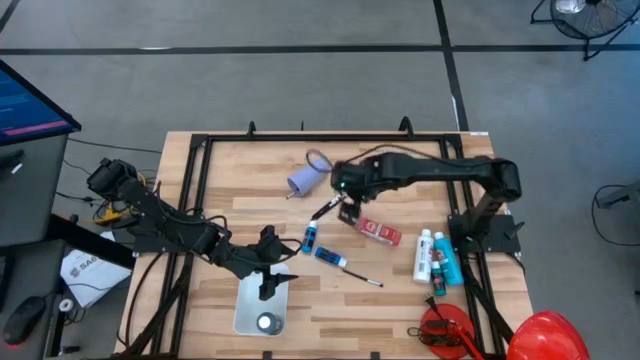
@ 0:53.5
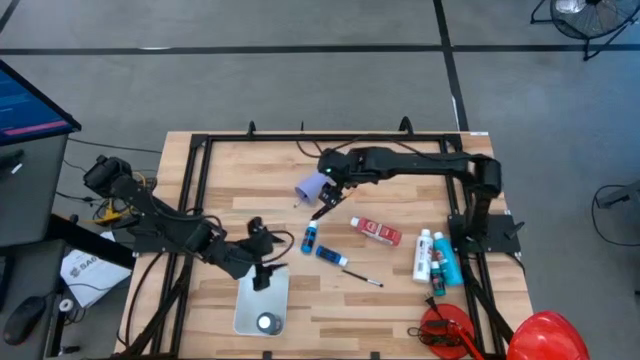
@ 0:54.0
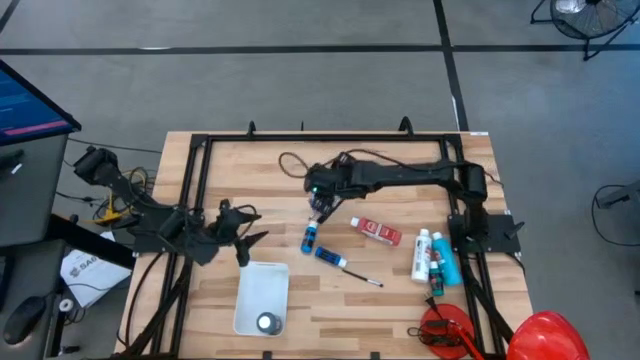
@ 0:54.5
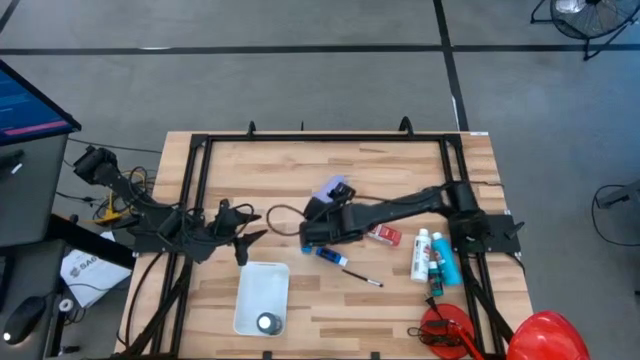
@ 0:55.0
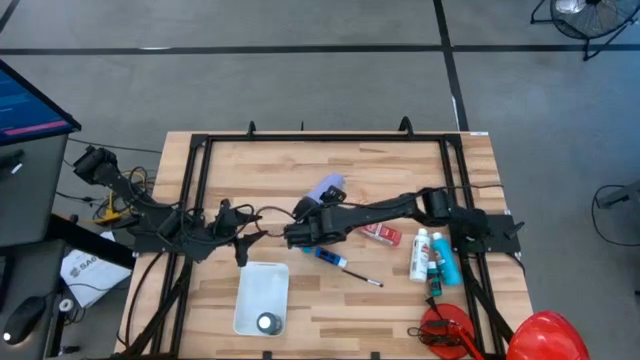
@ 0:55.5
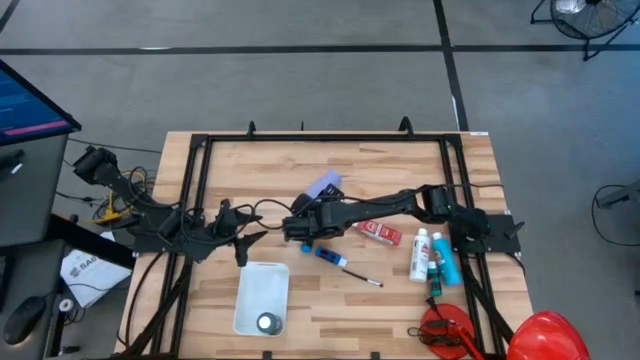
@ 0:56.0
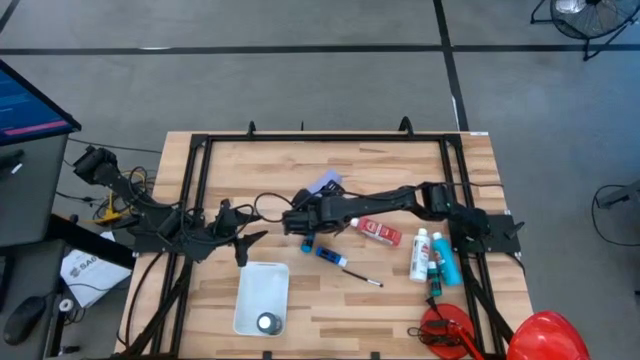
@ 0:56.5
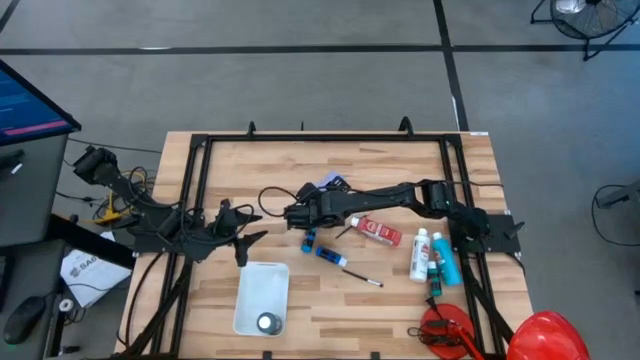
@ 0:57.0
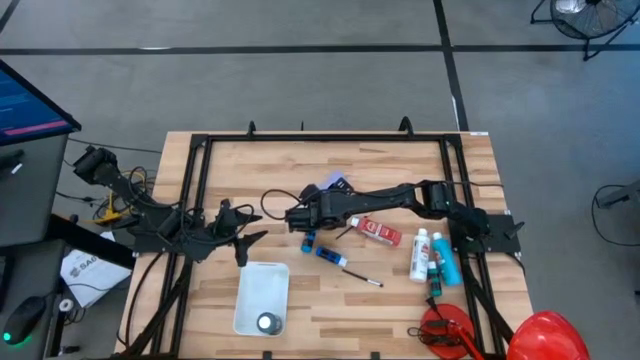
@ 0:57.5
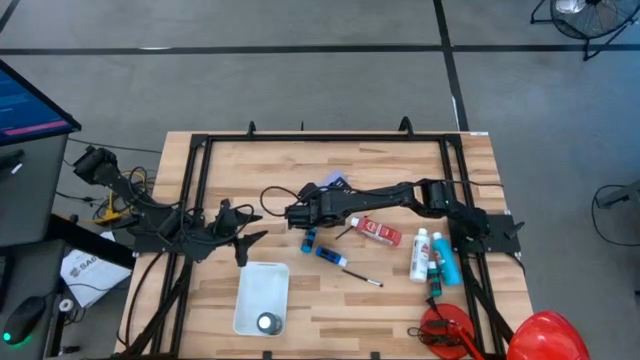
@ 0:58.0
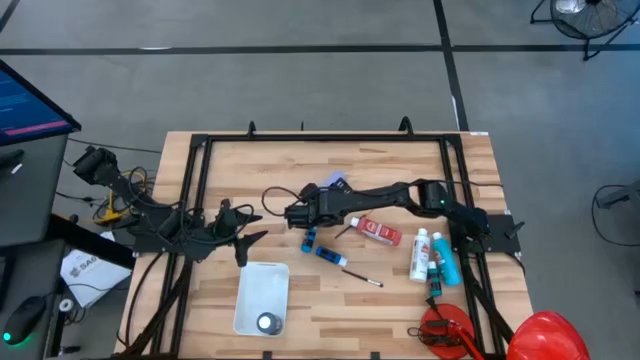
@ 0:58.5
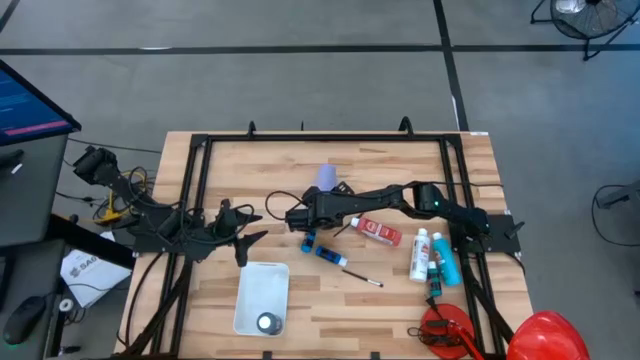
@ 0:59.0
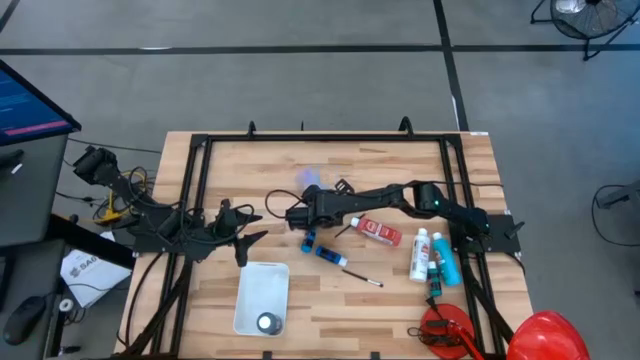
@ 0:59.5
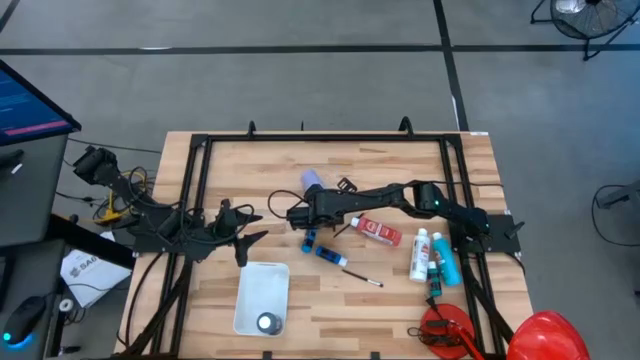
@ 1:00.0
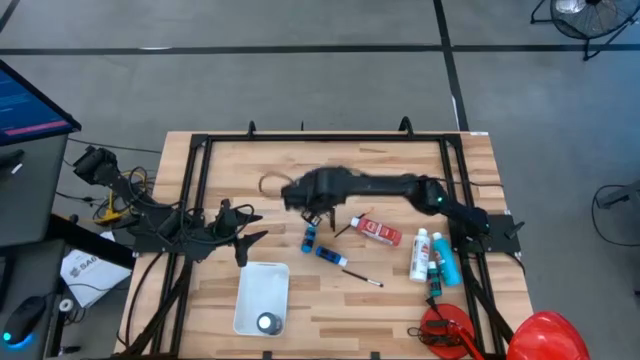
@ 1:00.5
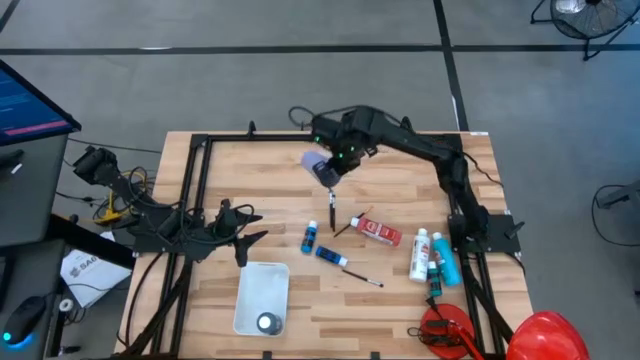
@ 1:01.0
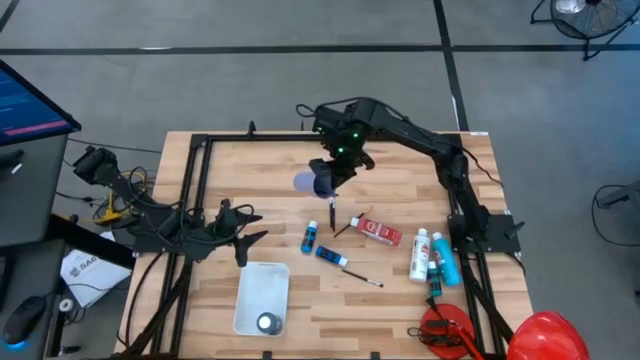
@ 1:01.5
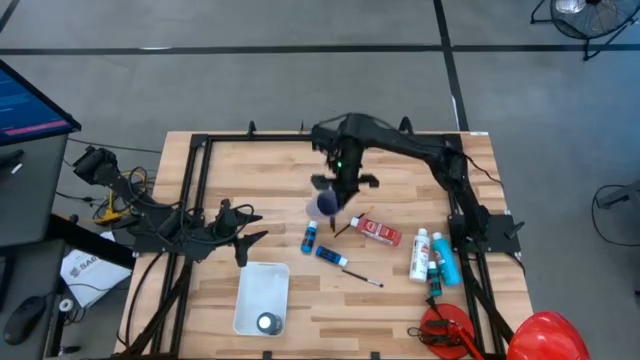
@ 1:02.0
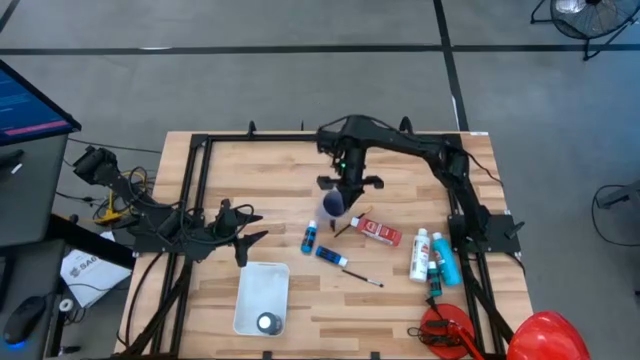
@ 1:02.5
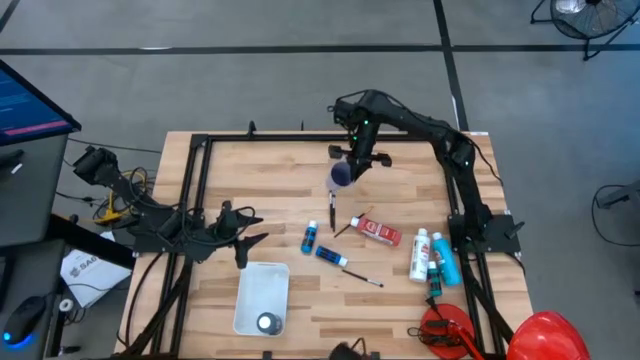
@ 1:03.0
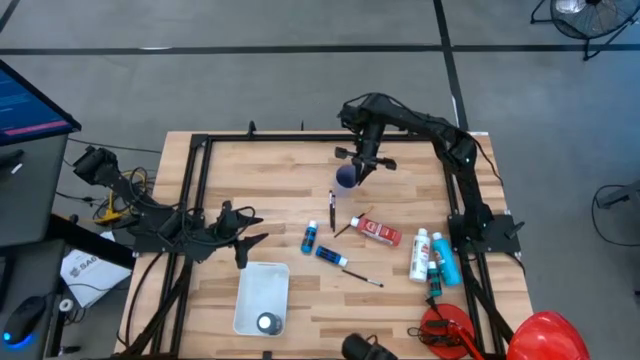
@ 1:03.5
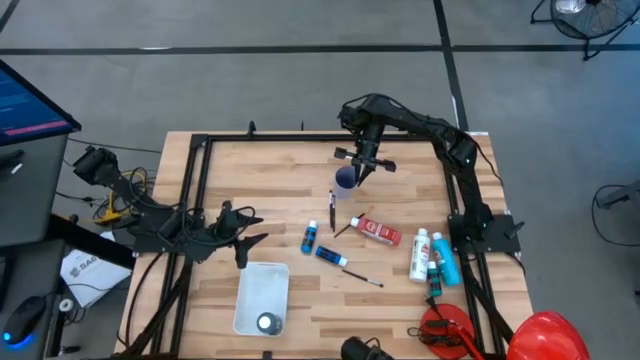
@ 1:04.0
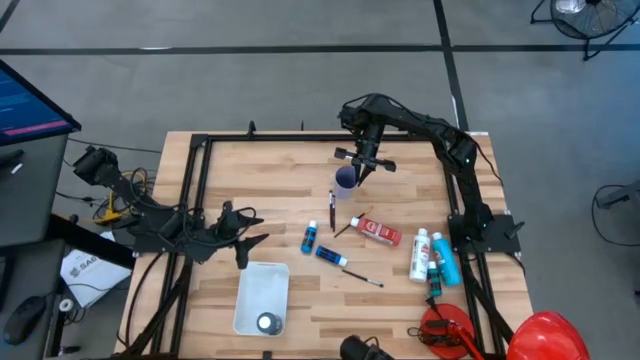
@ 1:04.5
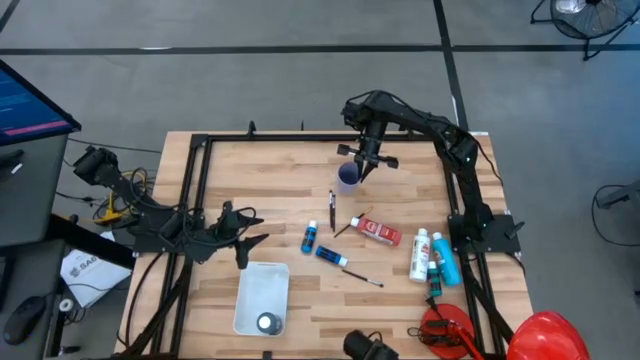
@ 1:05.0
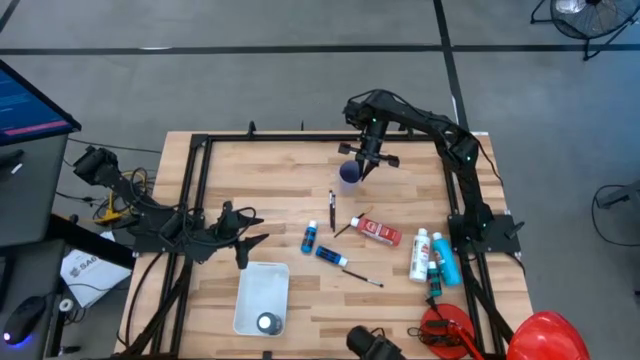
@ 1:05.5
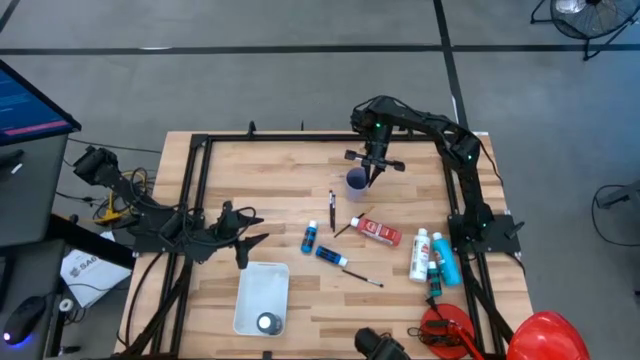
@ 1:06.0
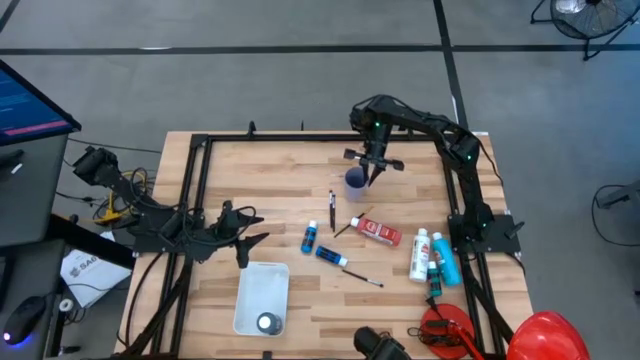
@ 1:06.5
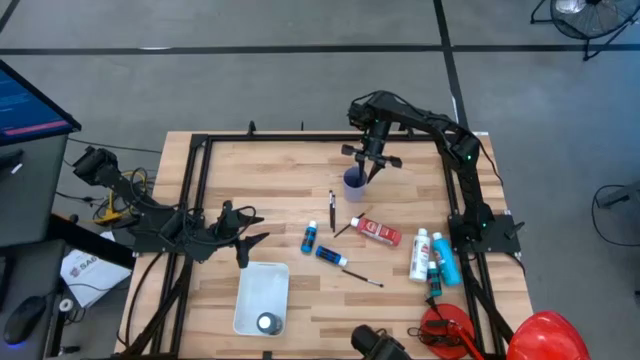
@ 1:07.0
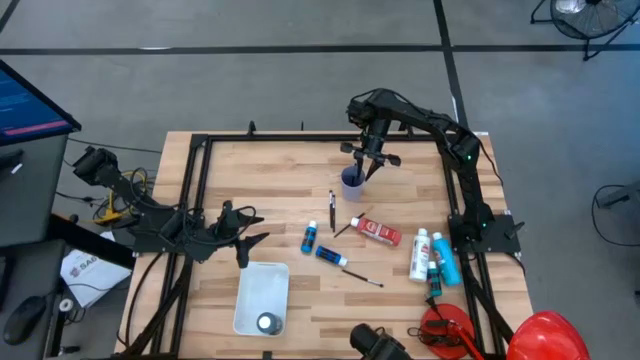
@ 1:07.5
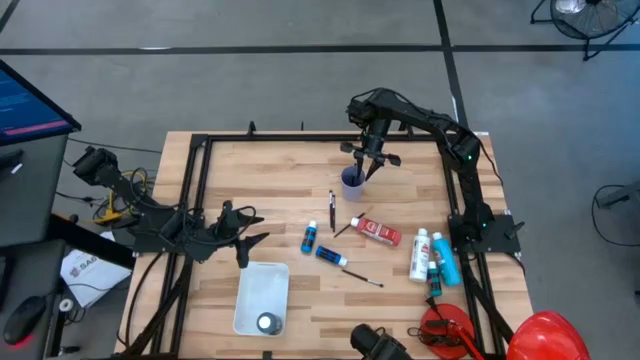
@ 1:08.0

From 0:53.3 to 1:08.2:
Task: Pick & Place Paint Supplies
Adjust the violet cup on the table

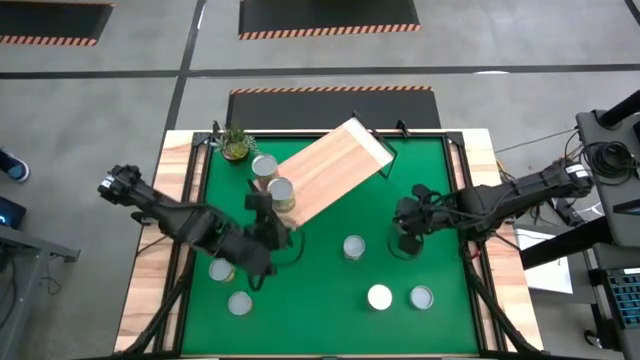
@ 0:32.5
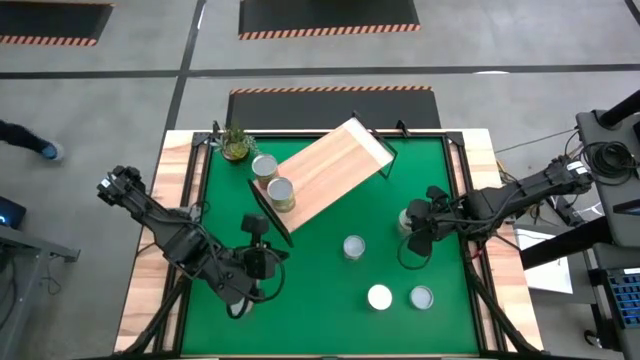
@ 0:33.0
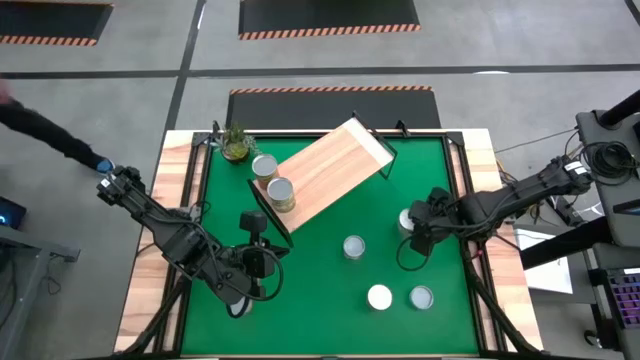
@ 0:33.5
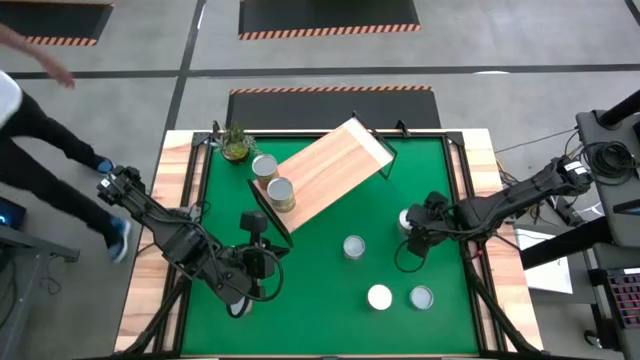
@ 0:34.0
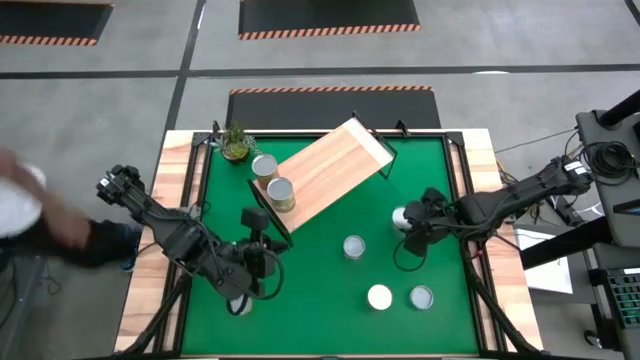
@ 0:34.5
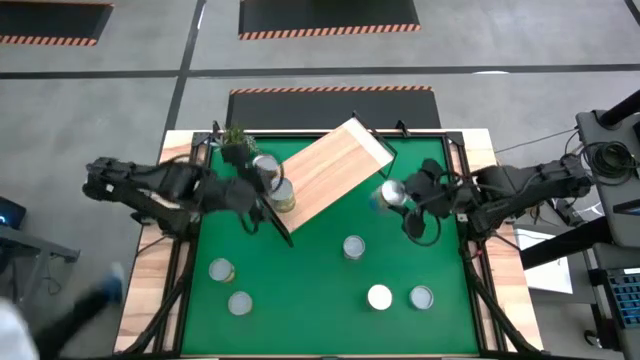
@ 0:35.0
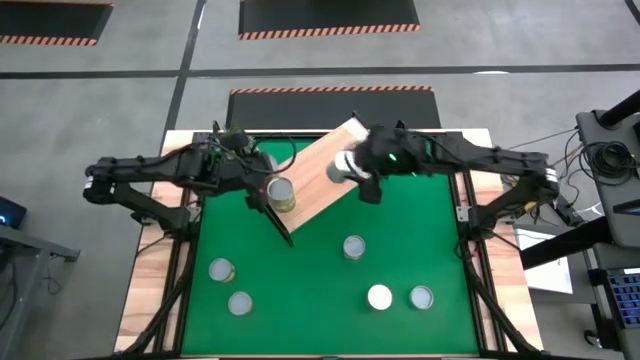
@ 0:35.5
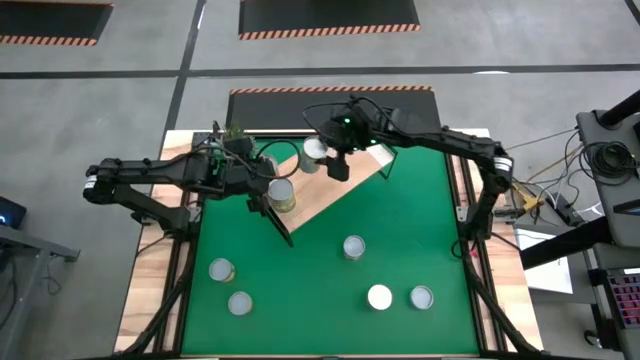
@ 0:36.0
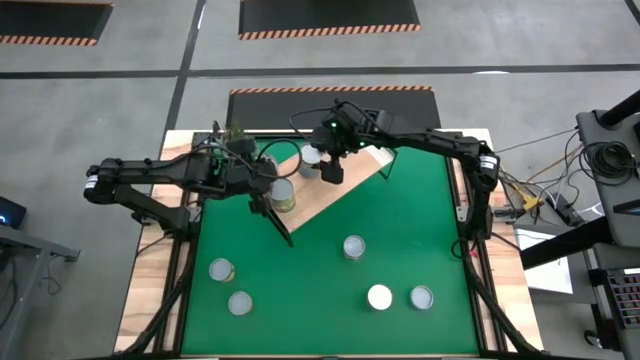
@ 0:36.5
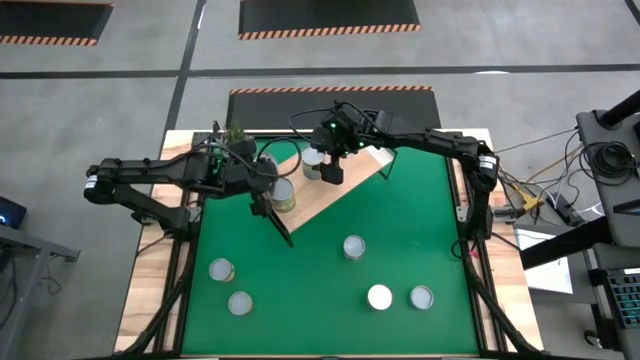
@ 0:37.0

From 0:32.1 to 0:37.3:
Task: Pick and place cans onto a shelf
Put the blue and yellow can on the shelf
